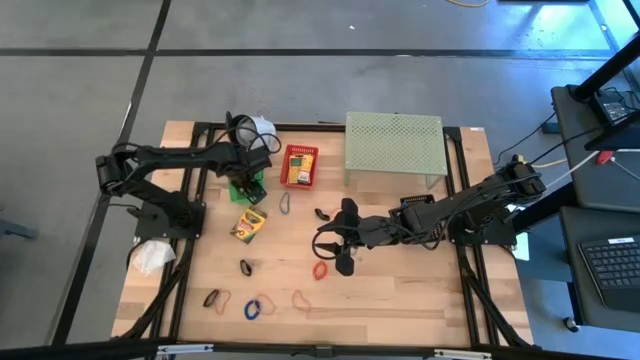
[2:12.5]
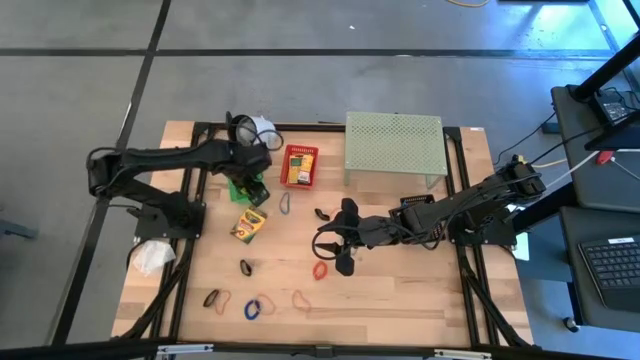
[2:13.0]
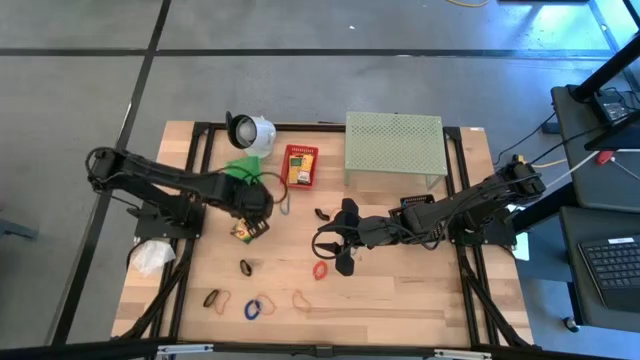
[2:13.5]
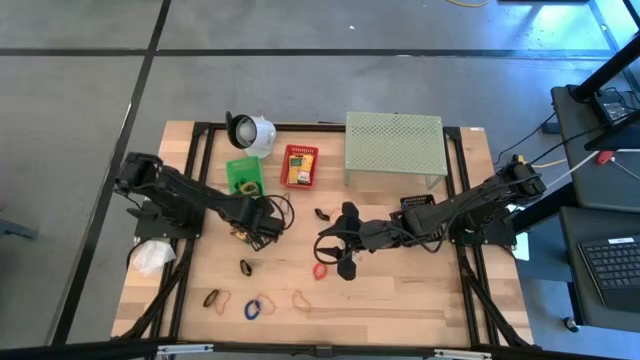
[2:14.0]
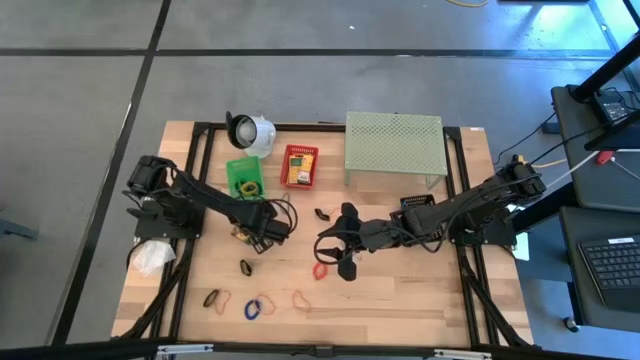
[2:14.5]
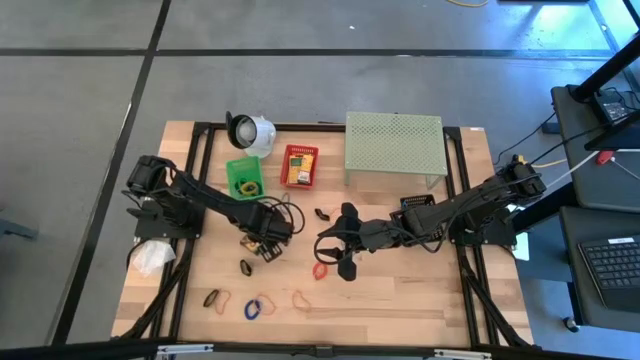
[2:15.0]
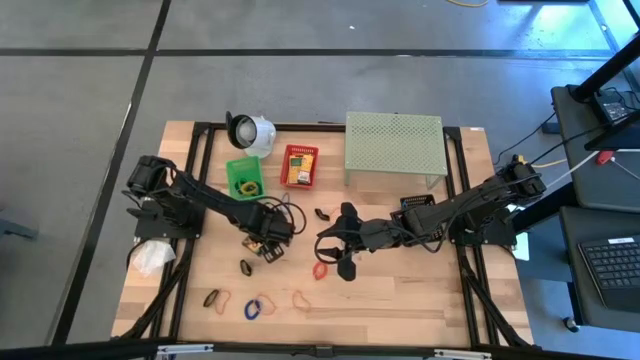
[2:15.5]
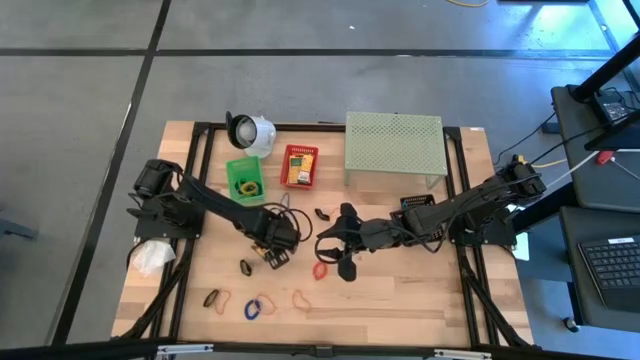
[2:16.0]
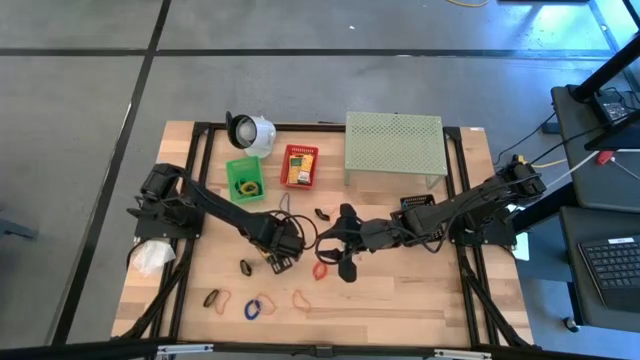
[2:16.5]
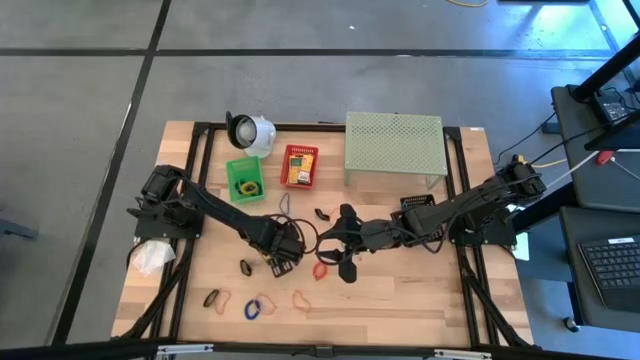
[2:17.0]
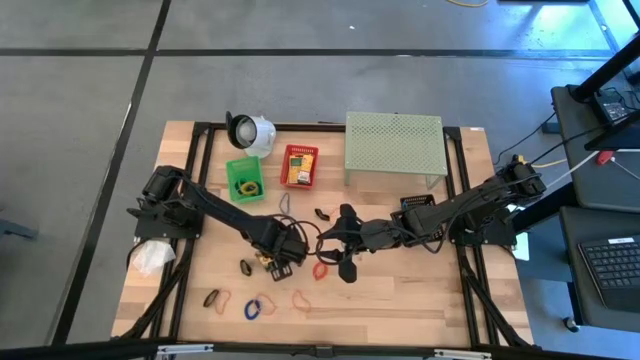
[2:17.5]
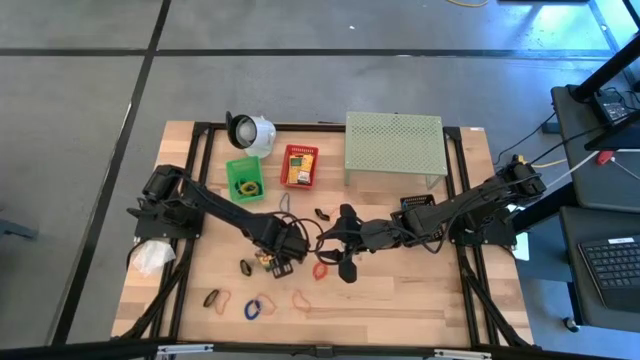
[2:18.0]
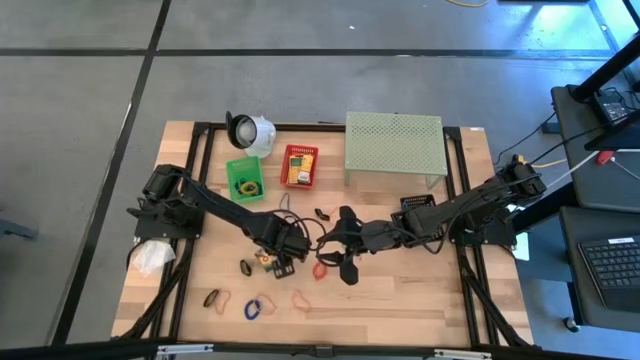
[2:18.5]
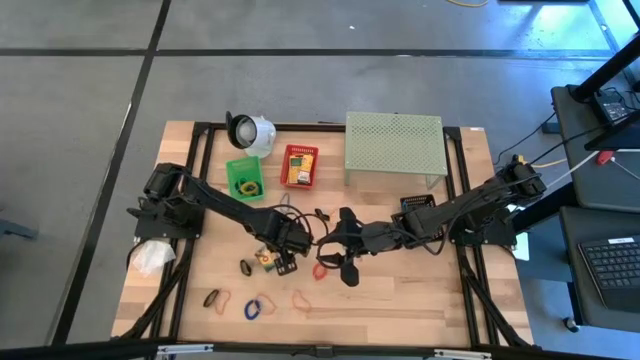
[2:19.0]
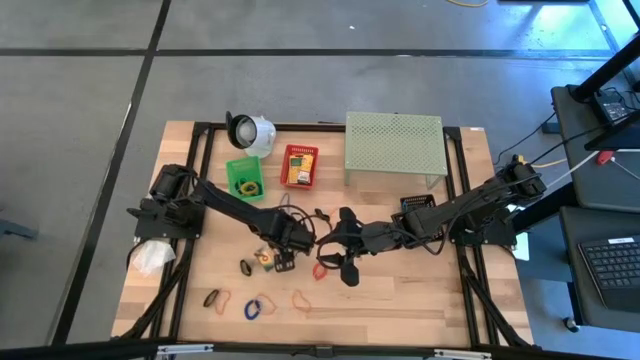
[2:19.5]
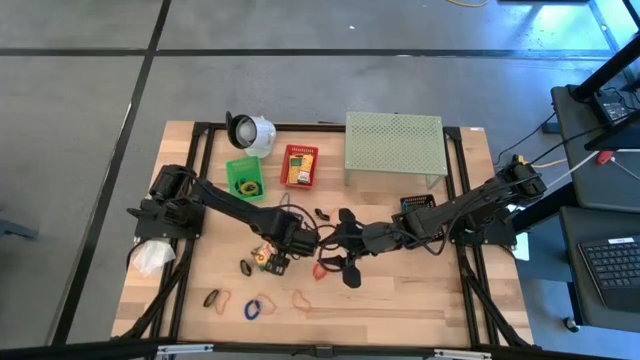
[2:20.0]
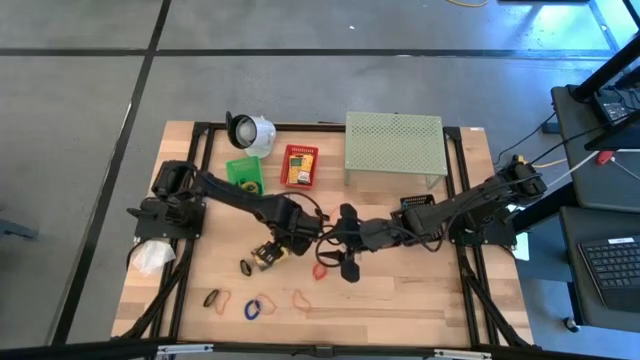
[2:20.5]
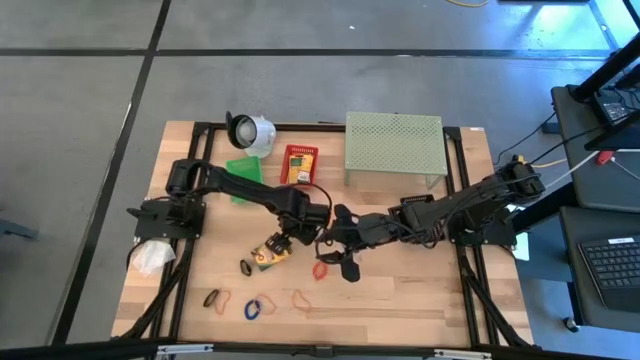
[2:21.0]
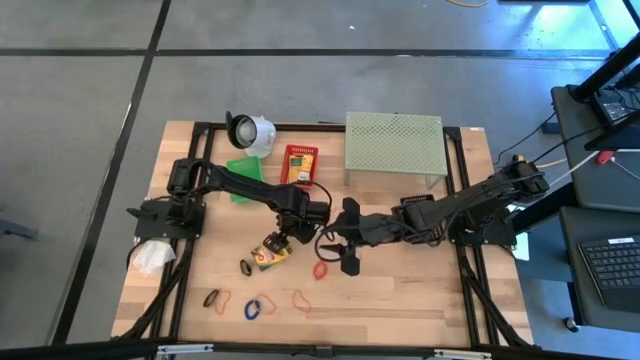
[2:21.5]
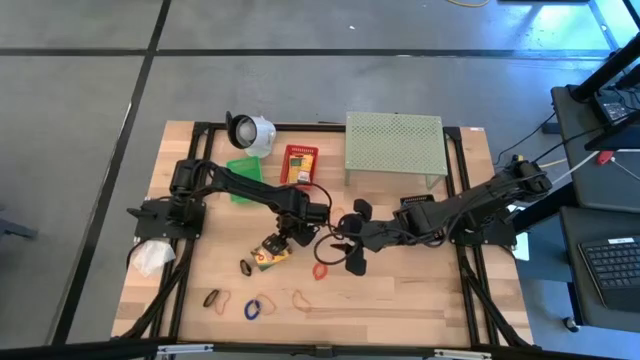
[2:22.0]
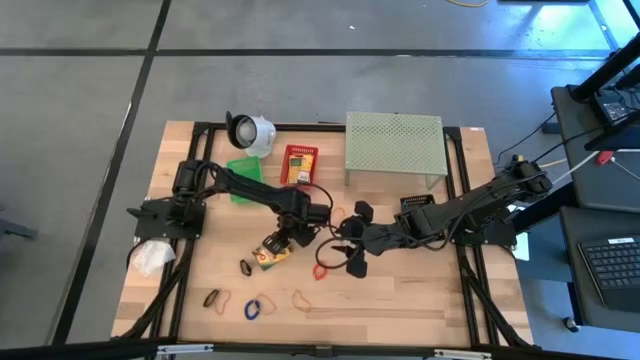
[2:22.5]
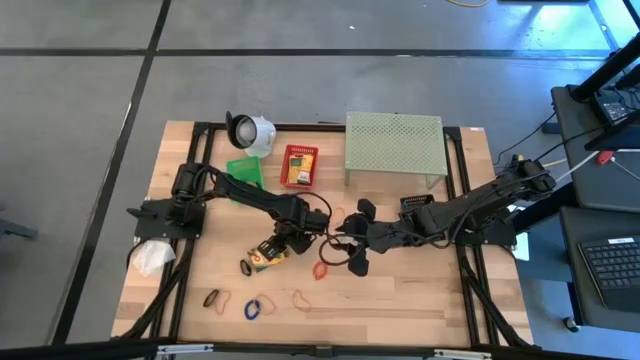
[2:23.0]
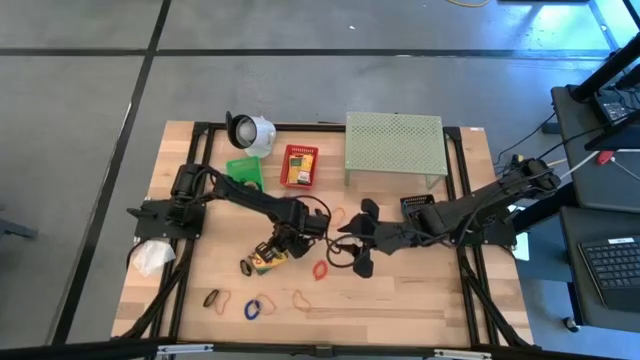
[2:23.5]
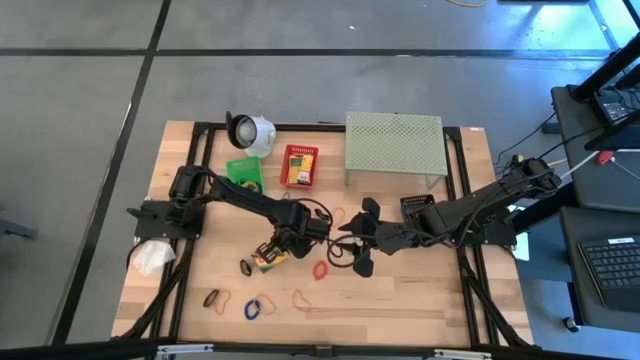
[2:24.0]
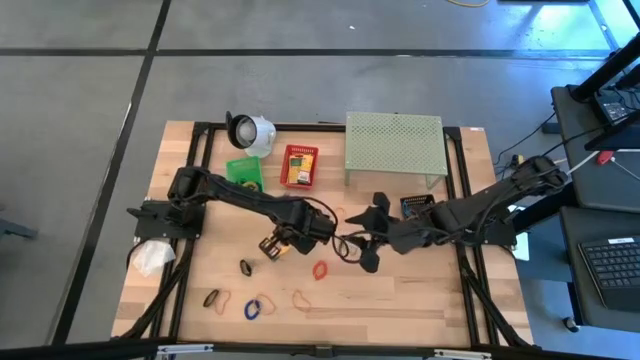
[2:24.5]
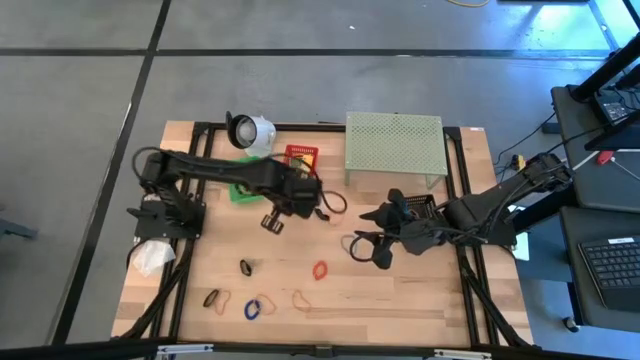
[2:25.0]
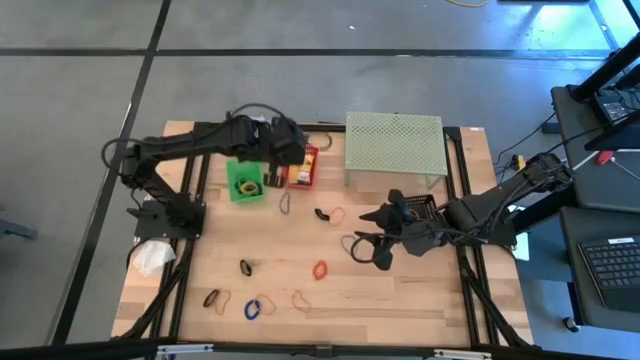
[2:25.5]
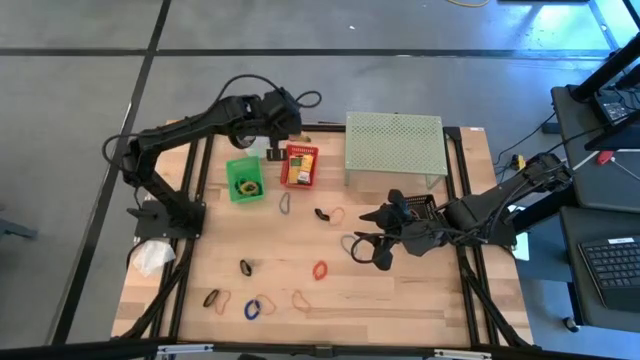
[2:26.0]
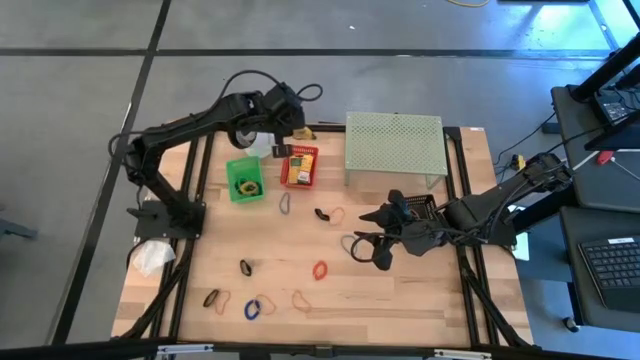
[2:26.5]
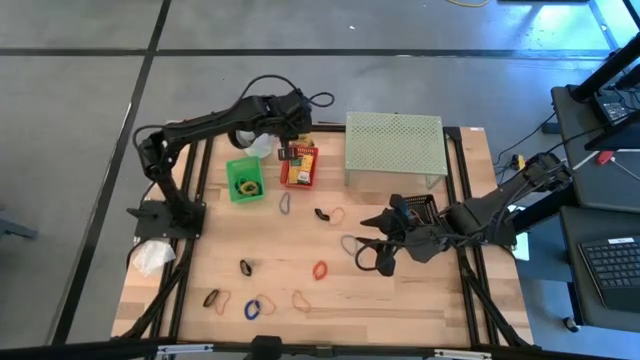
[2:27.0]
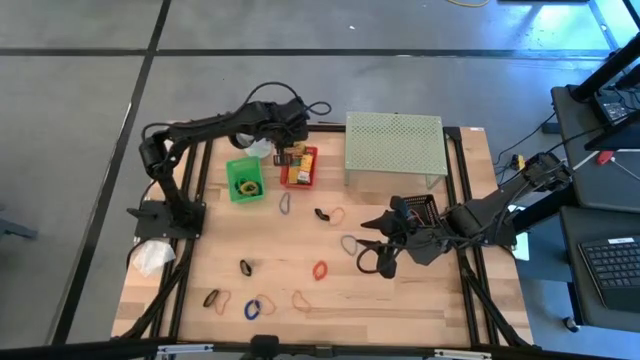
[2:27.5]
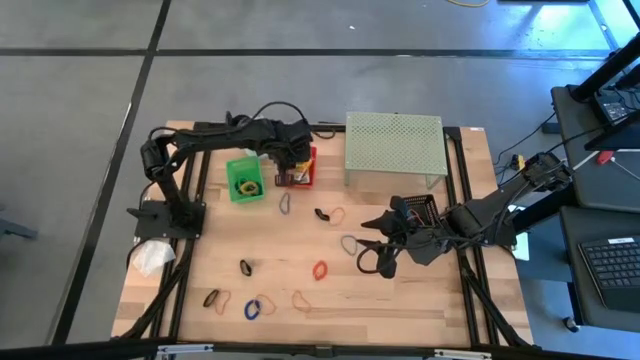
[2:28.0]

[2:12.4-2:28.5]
Task: Pick & Place Office Desk Supplies
Put the crayons box into the red basket

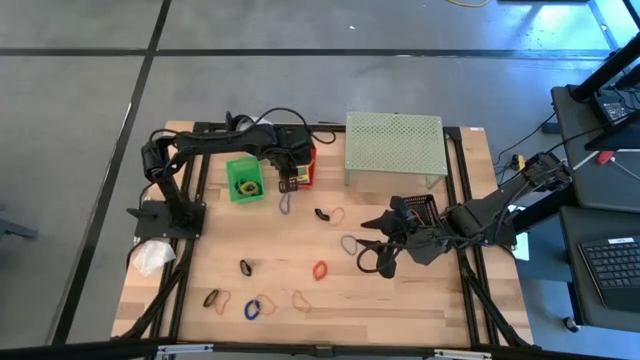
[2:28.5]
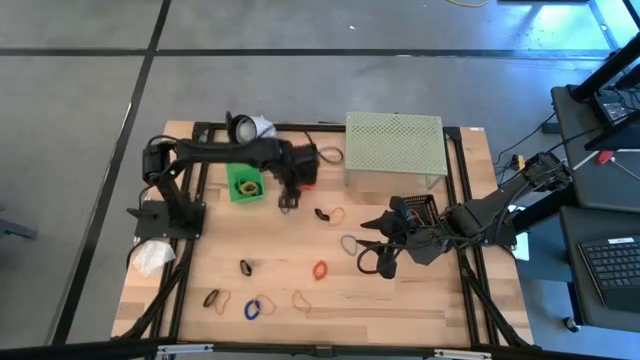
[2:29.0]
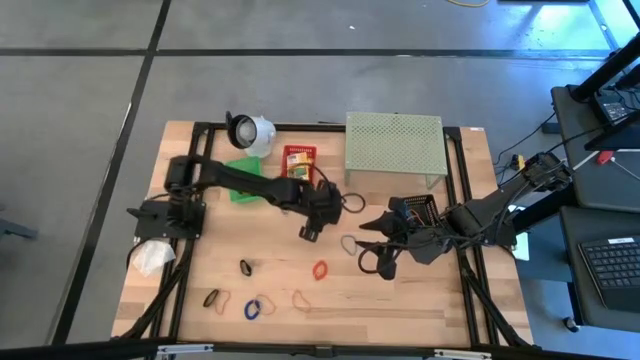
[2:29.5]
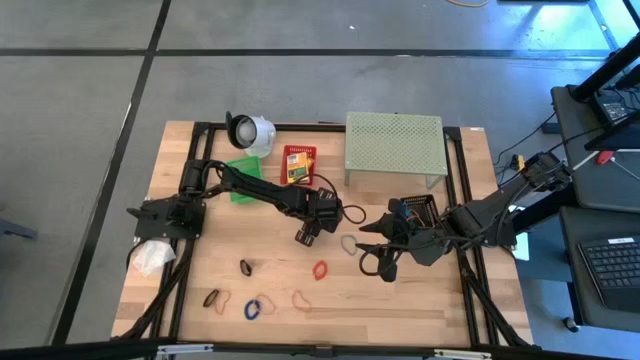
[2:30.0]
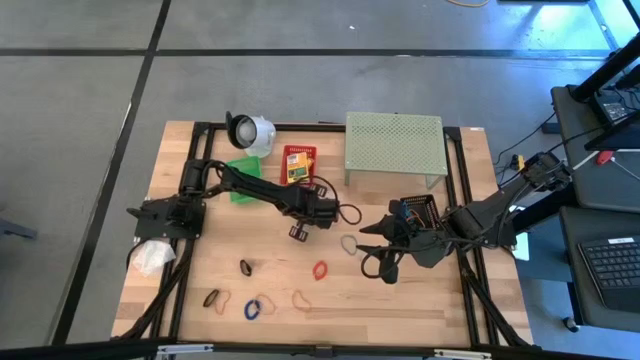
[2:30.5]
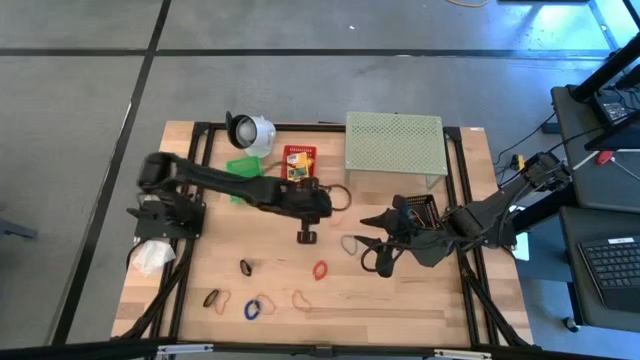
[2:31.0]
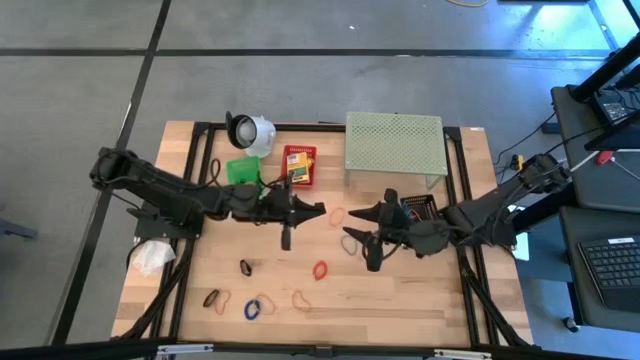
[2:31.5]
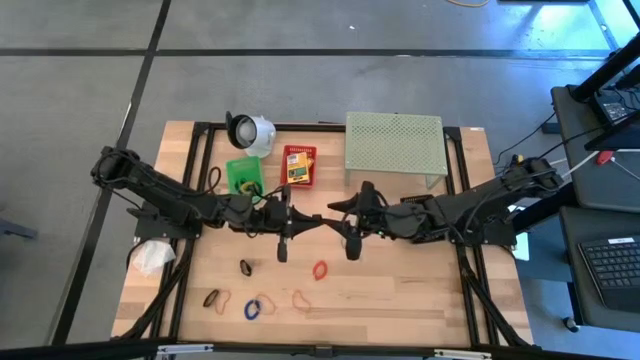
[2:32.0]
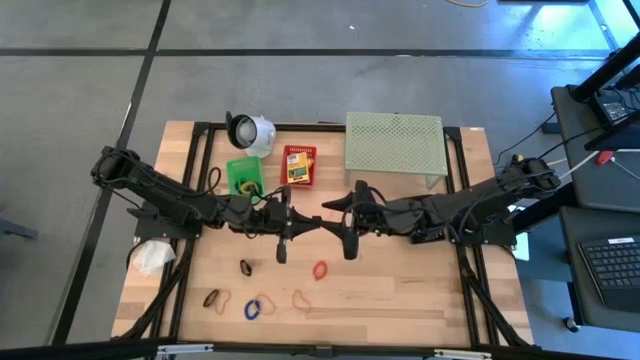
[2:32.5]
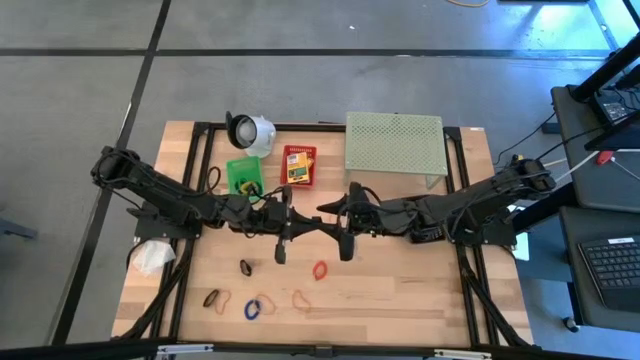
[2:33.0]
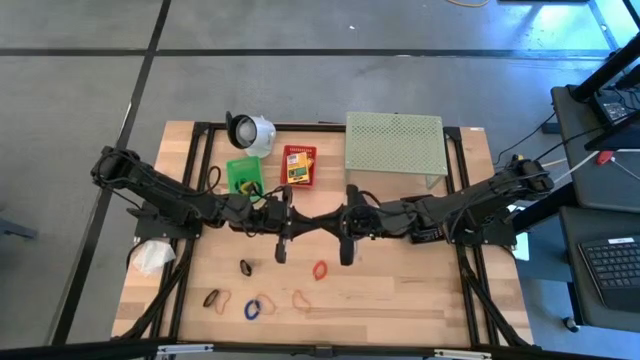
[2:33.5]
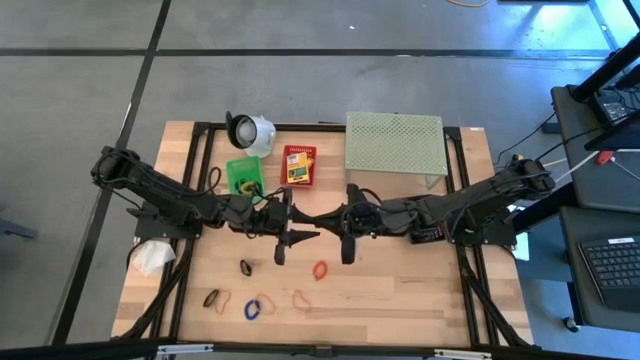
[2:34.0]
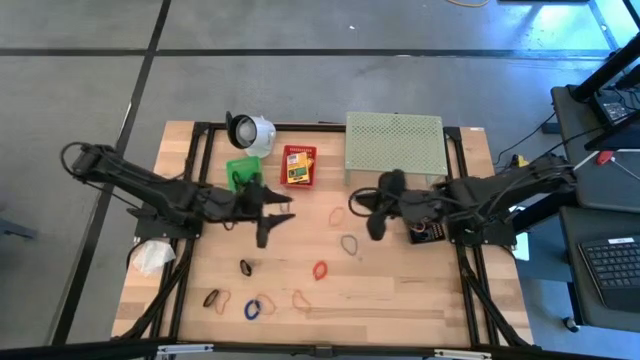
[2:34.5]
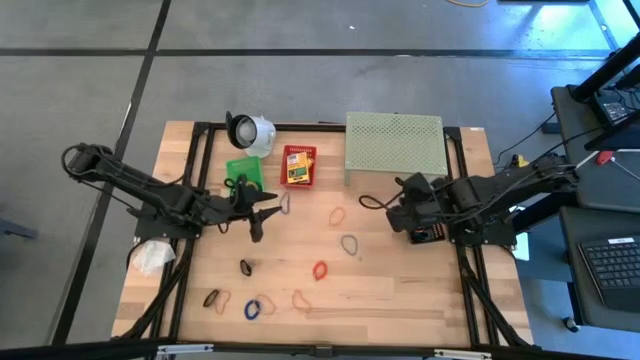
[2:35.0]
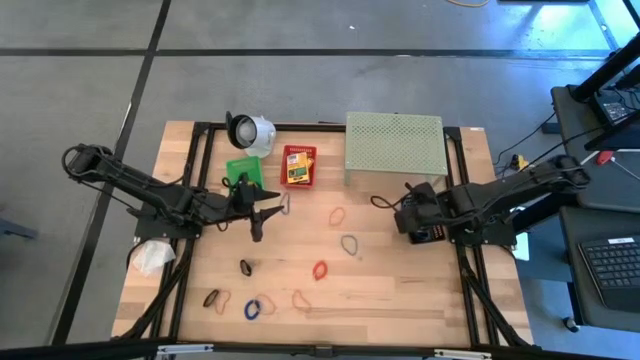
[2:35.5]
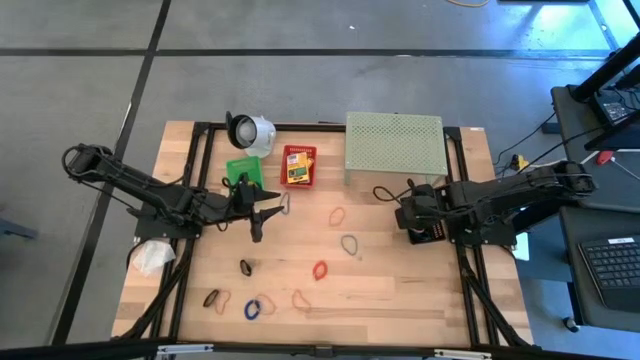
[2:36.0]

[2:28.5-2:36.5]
Put the black rubber band into the black basket
